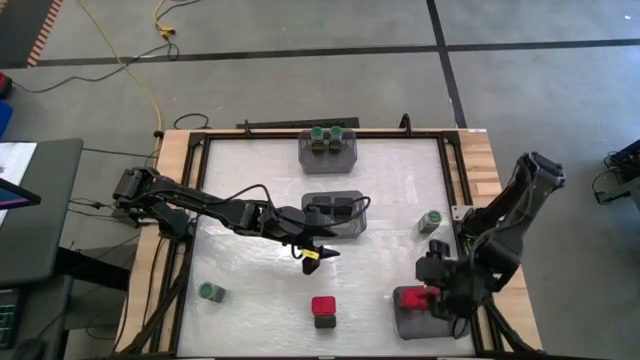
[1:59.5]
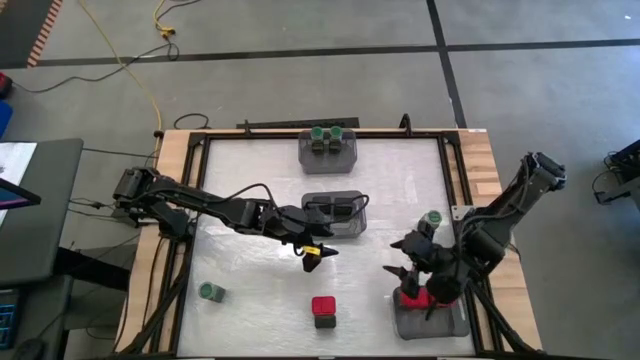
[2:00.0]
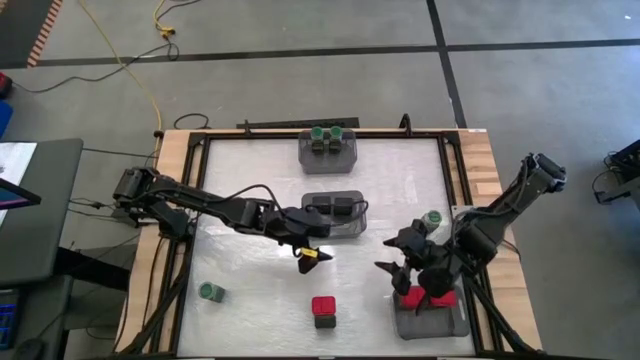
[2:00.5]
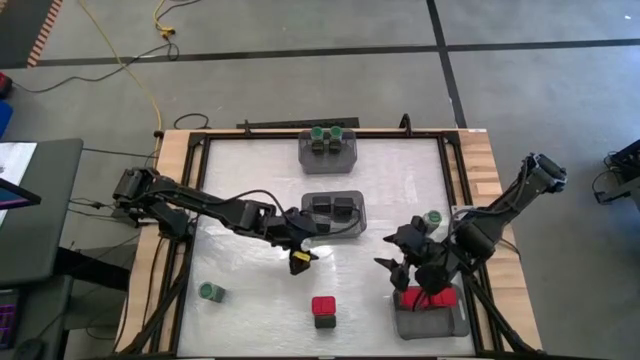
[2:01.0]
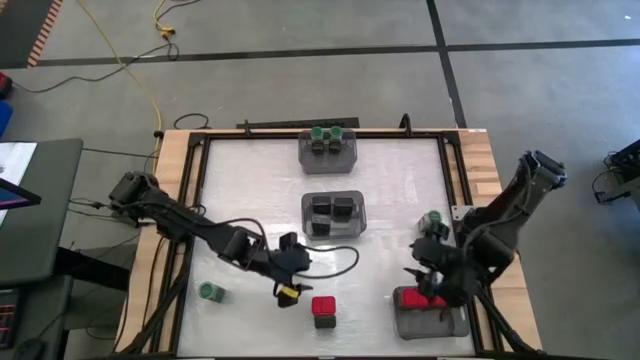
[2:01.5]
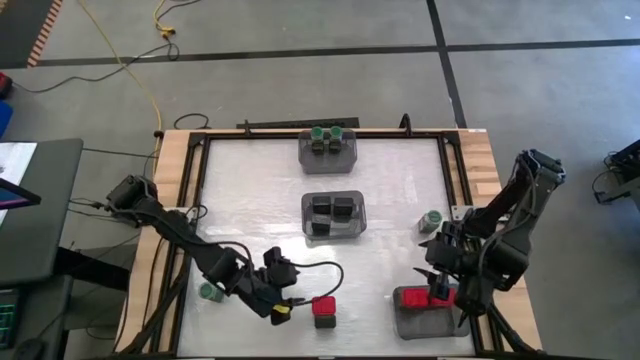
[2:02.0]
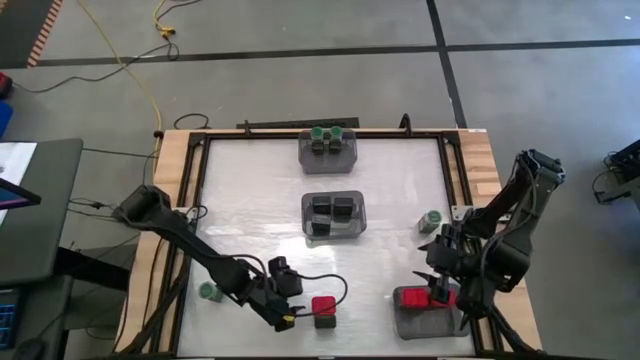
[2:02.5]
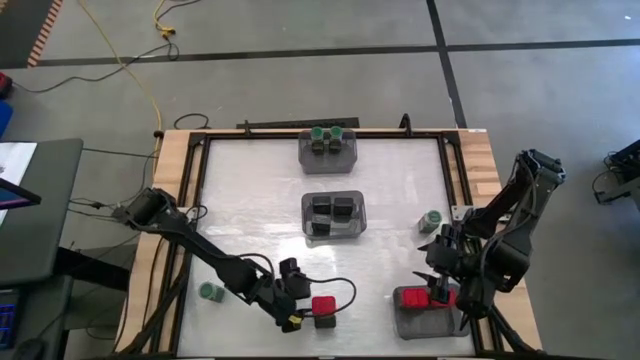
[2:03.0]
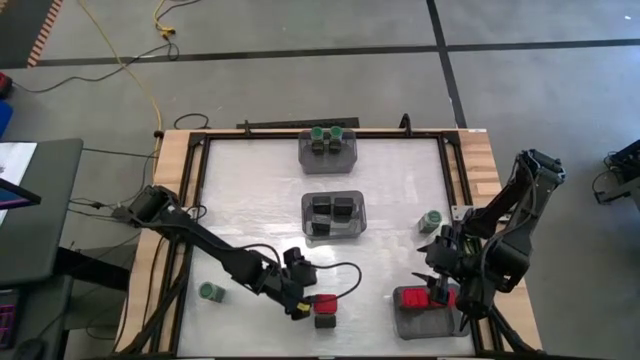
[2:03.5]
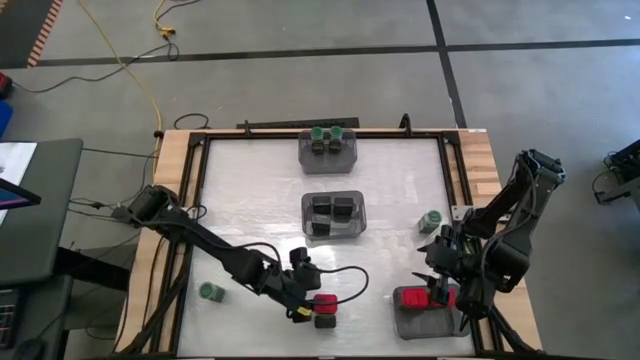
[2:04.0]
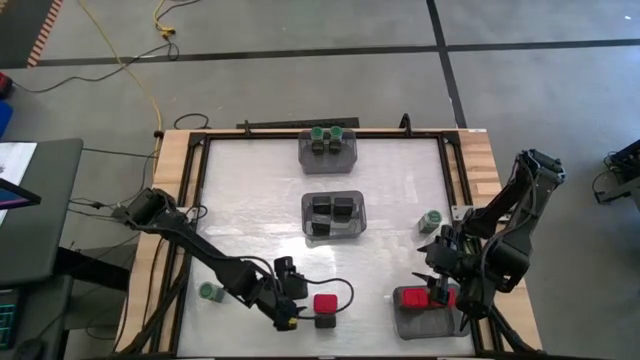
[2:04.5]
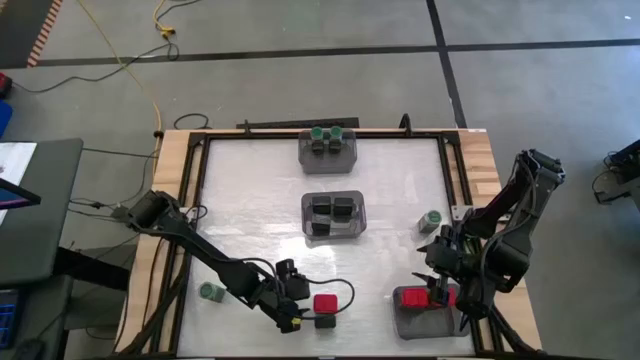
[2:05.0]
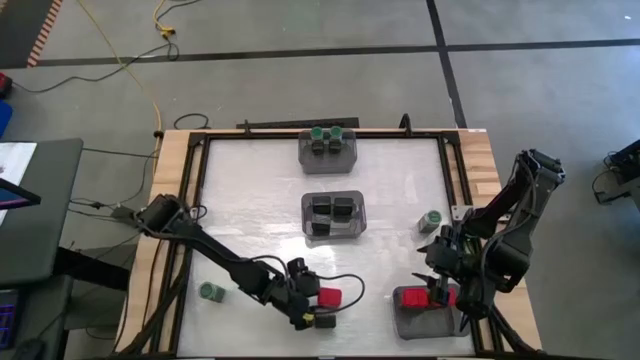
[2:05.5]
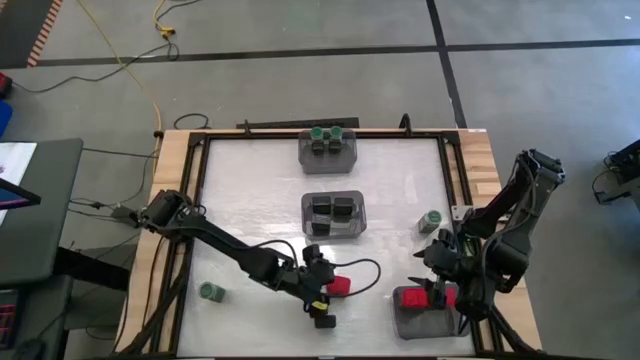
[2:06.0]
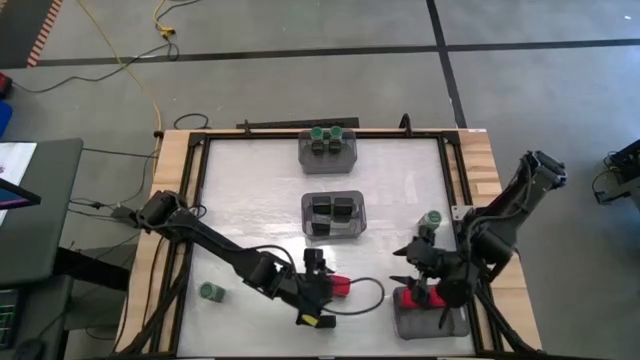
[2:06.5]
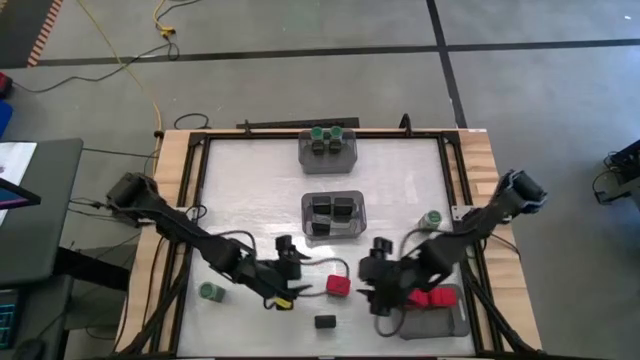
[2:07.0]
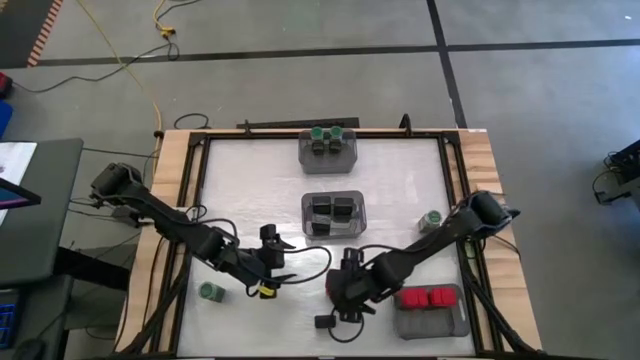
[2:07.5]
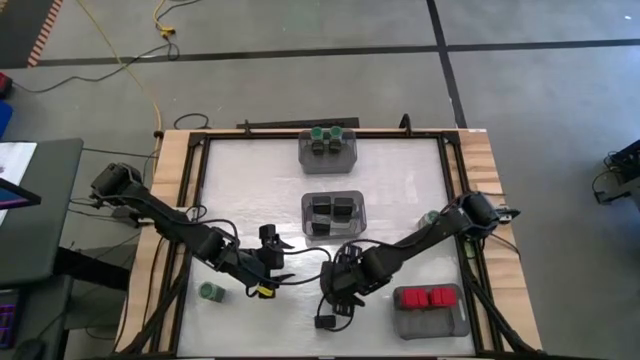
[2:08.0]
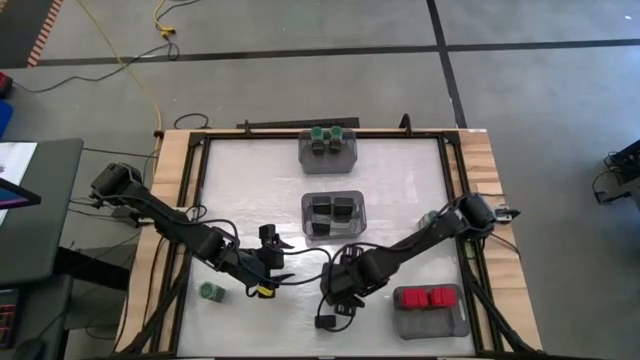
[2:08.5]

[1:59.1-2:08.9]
Task: Sort spices by type
Put the red seasoning can into the bottom black bin

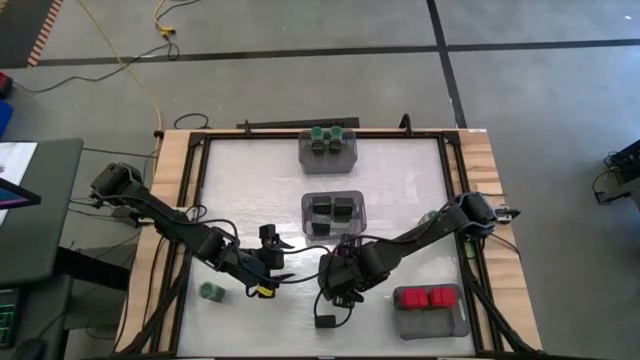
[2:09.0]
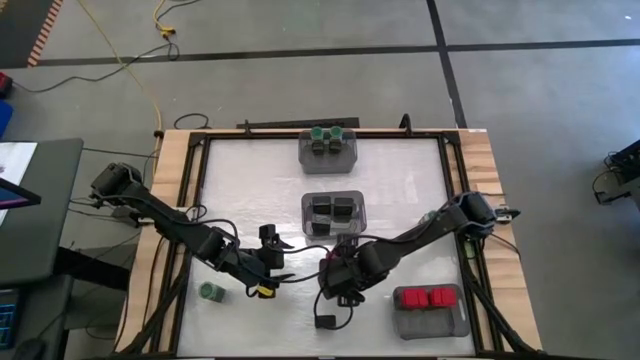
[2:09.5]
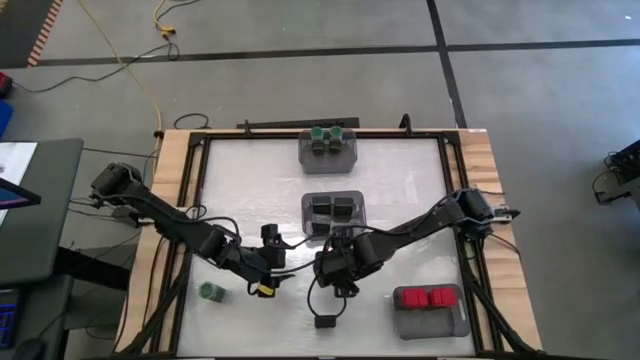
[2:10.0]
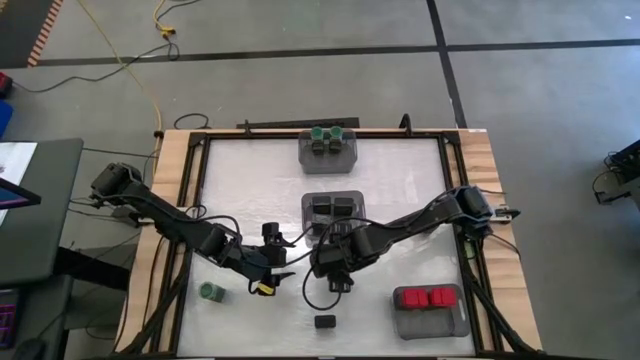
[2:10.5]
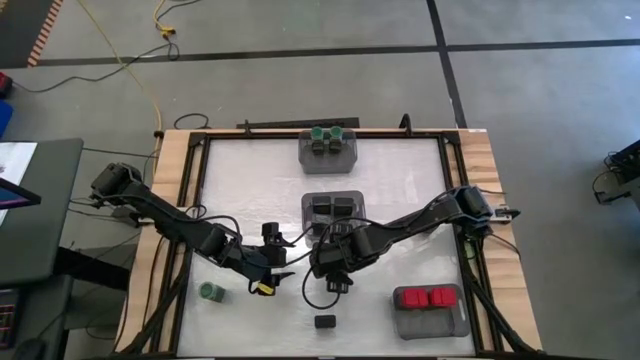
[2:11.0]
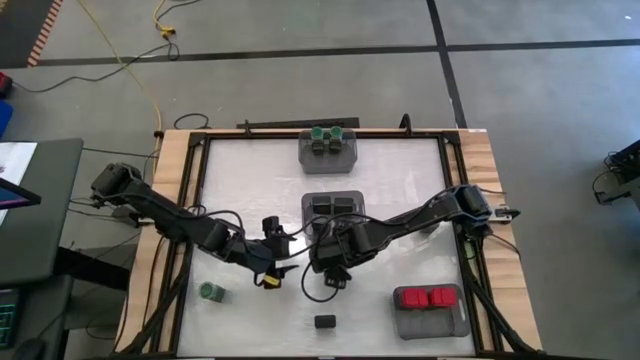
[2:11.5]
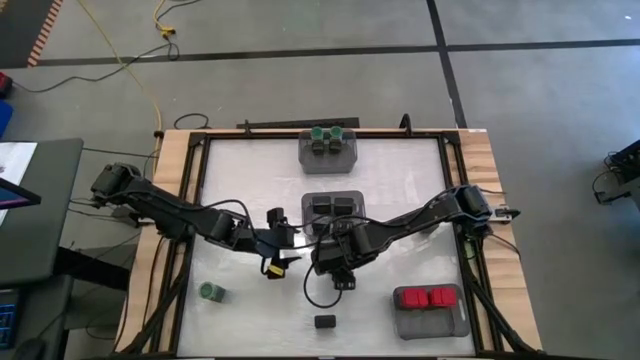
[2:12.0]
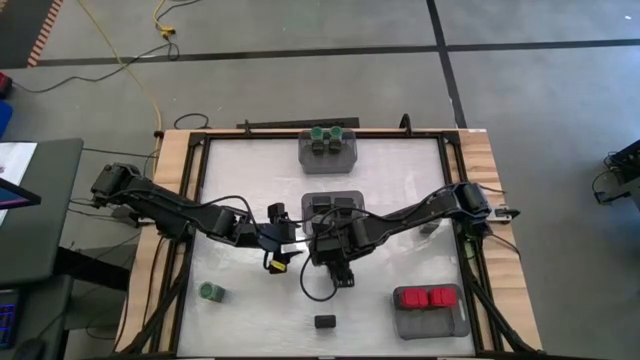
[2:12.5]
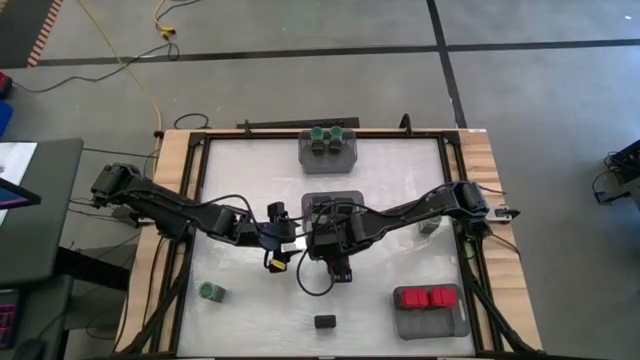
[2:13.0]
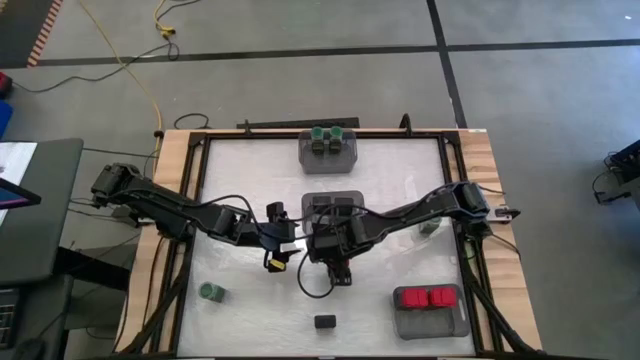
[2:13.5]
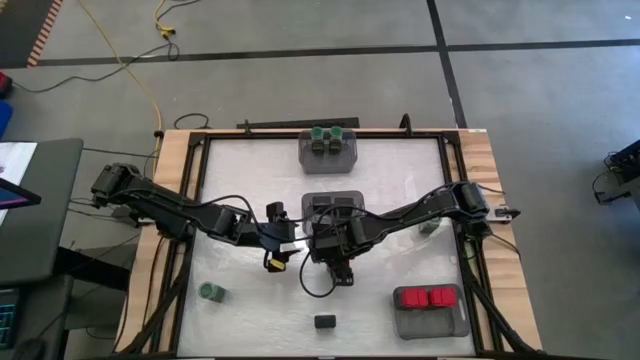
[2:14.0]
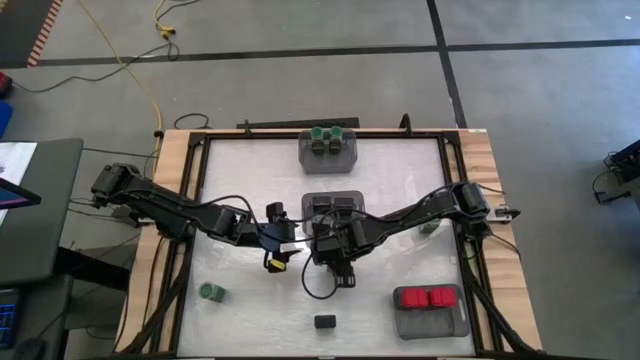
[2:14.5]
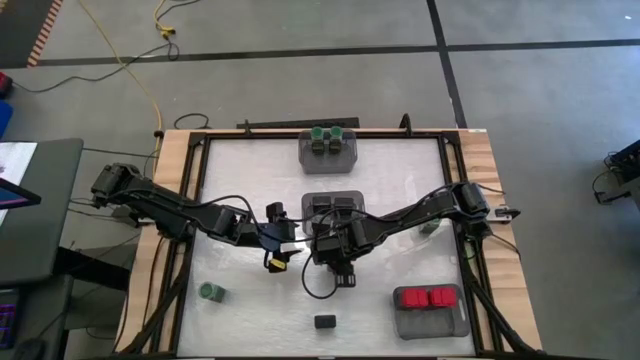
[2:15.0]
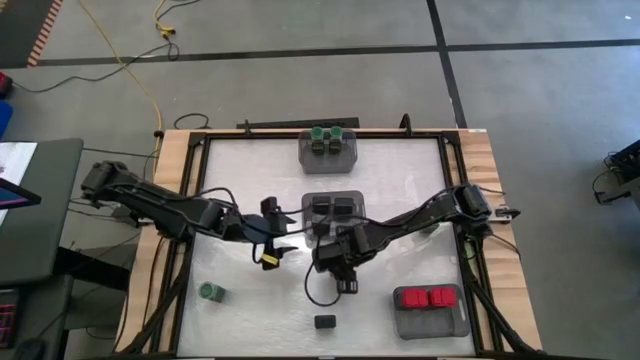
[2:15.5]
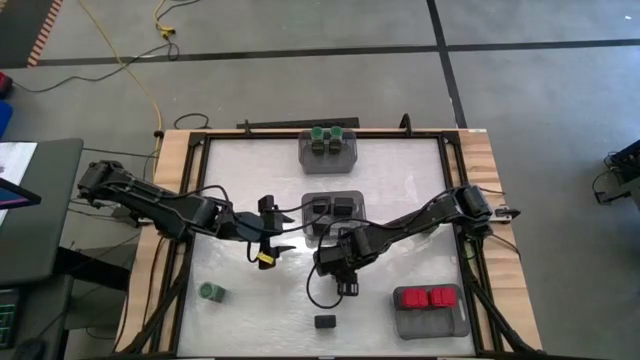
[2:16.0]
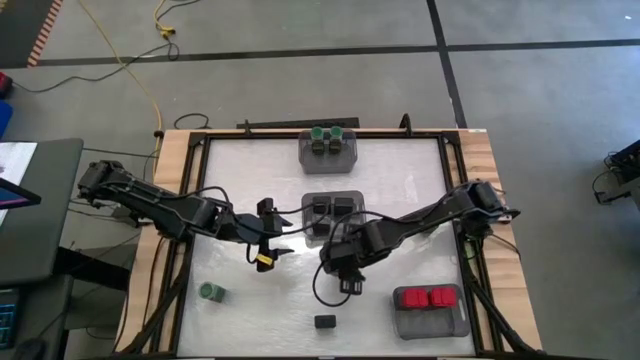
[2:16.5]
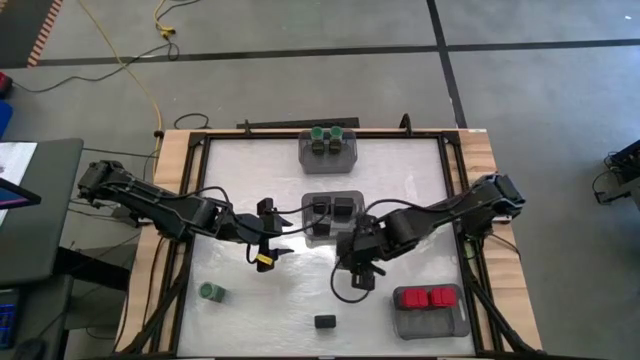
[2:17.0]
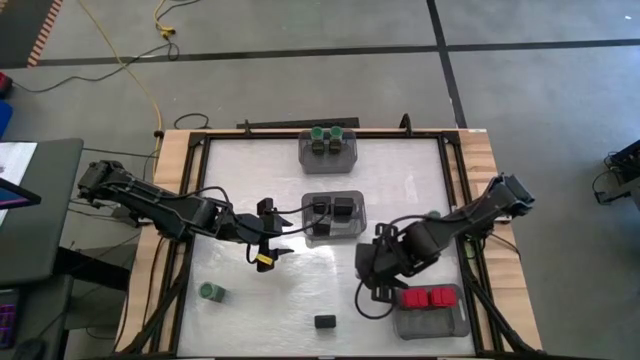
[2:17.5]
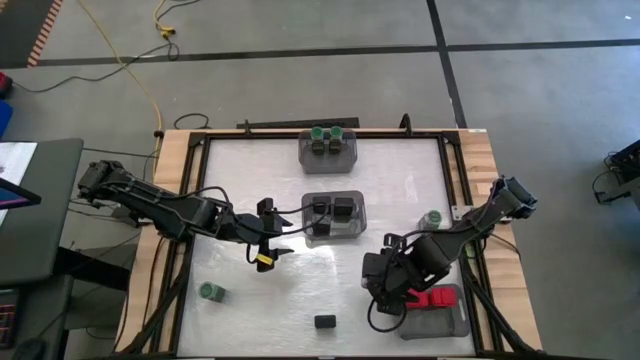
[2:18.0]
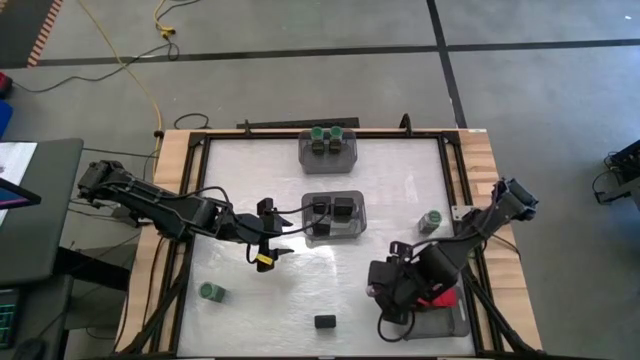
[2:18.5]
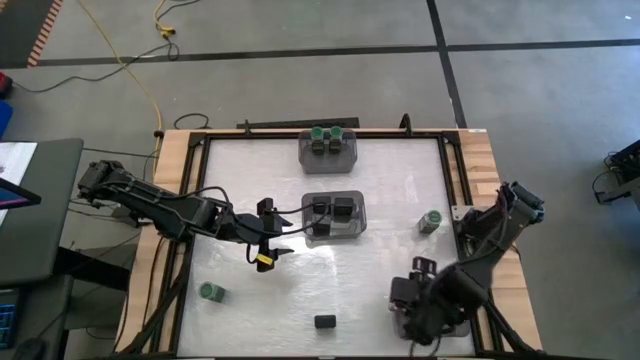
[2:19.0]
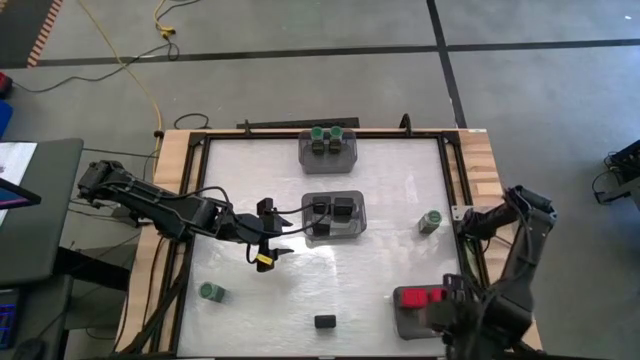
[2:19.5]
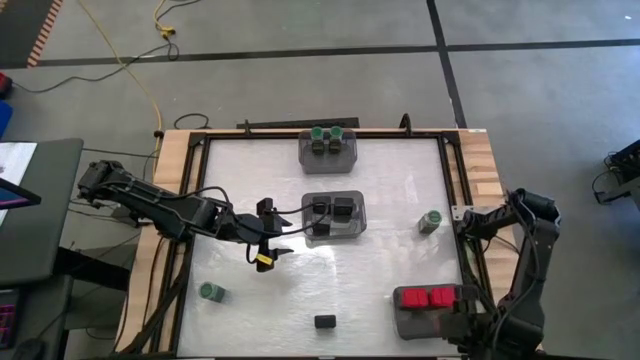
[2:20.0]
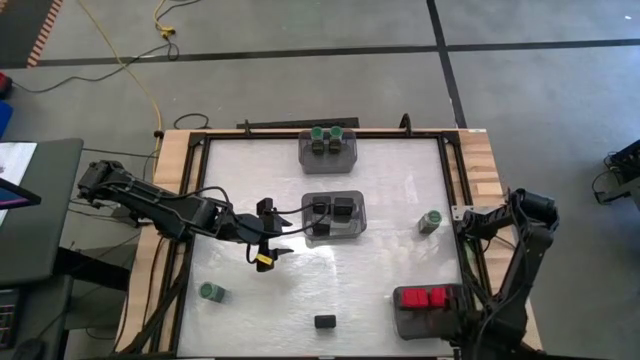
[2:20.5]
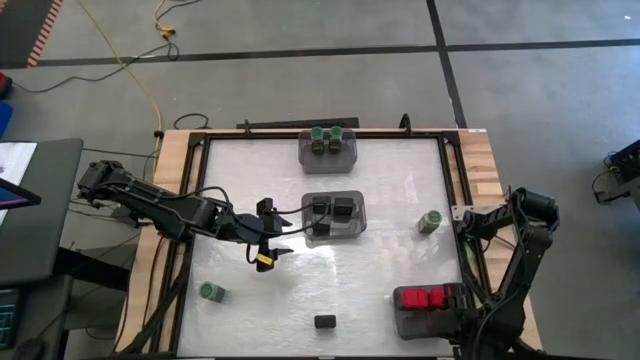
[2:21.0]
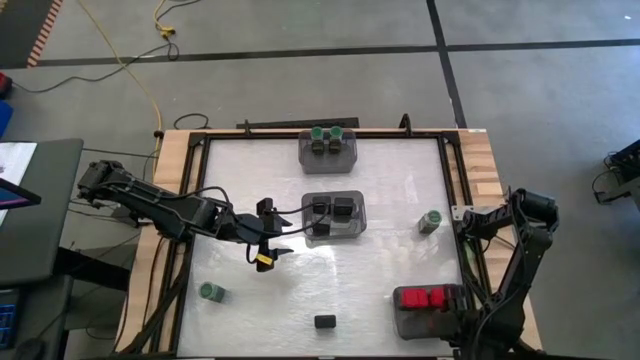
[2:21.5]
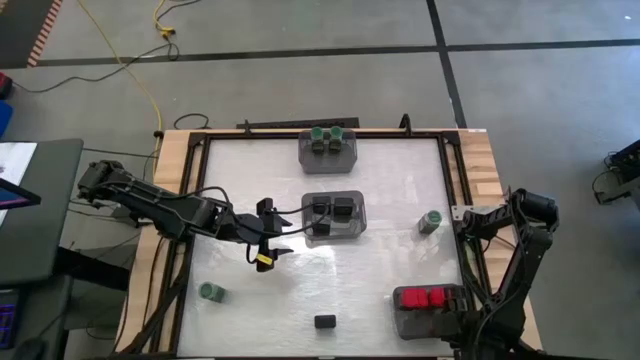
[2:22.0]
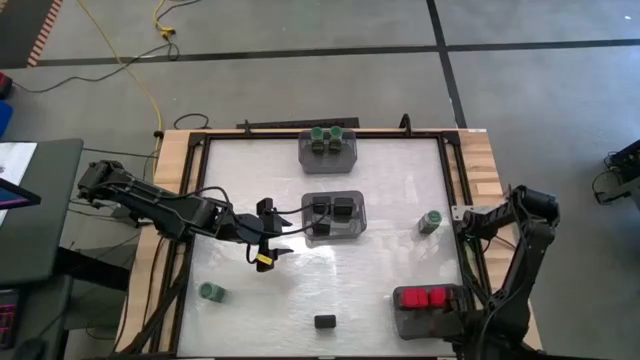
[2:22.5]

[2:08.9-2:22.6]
Put the red seasoning can into the bottom black bin
